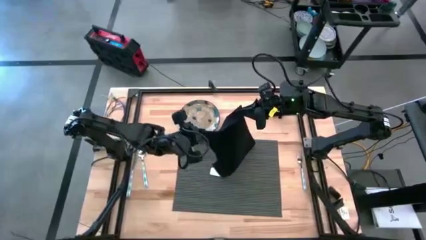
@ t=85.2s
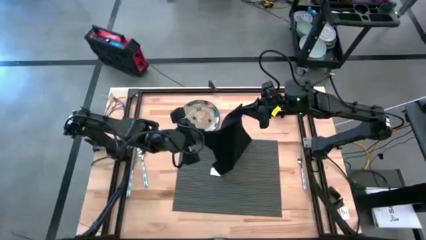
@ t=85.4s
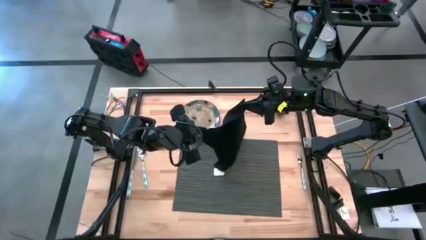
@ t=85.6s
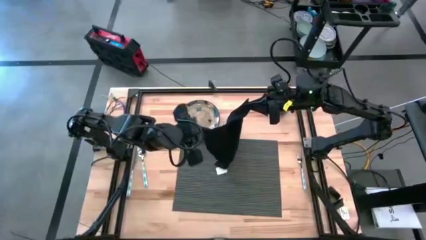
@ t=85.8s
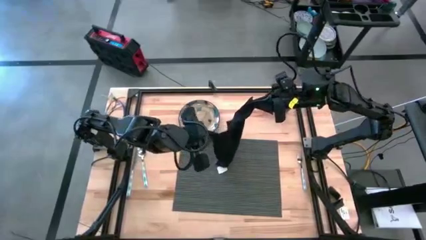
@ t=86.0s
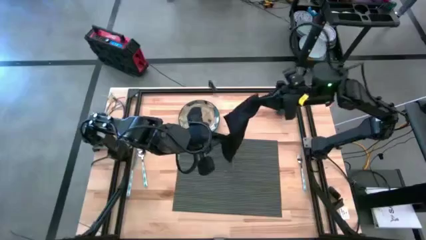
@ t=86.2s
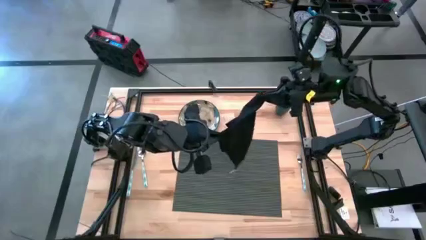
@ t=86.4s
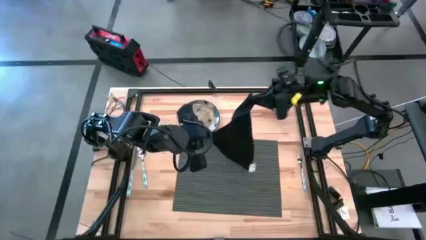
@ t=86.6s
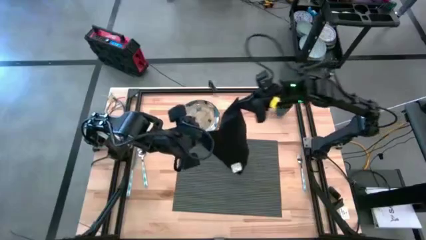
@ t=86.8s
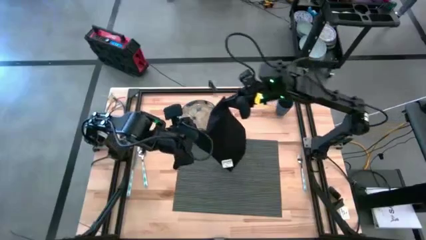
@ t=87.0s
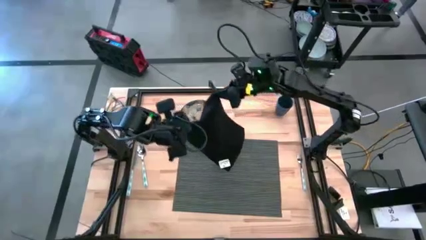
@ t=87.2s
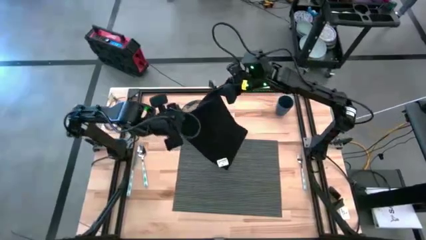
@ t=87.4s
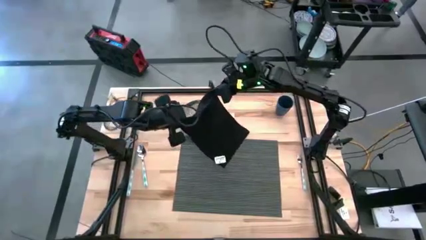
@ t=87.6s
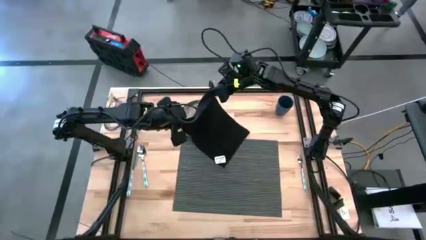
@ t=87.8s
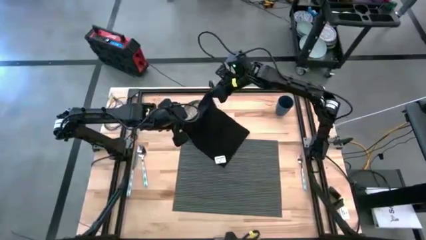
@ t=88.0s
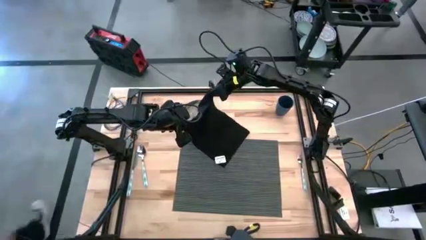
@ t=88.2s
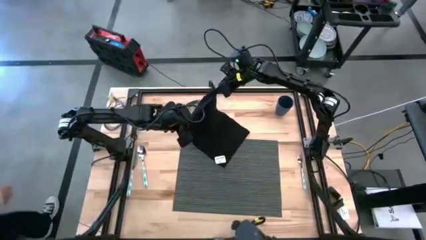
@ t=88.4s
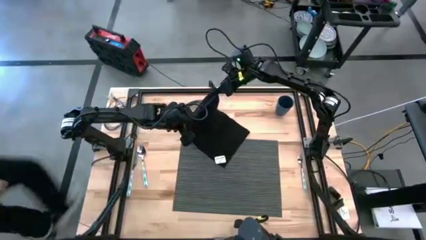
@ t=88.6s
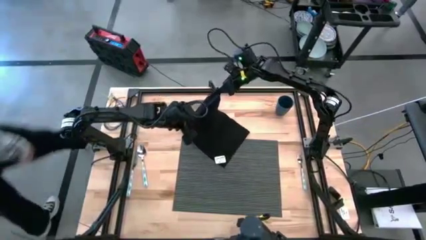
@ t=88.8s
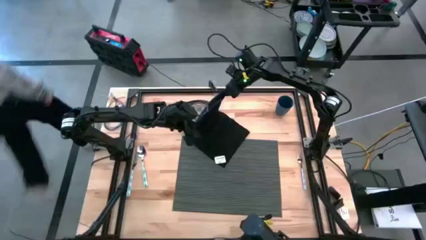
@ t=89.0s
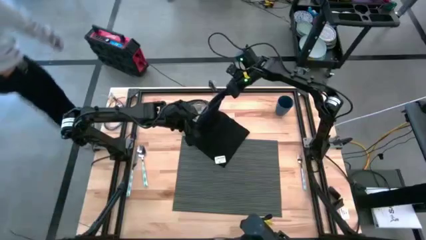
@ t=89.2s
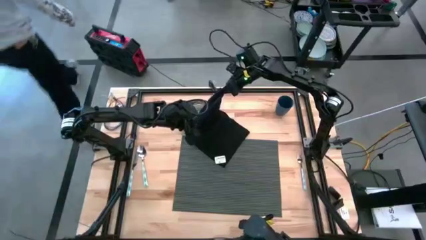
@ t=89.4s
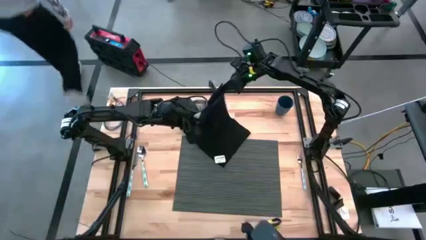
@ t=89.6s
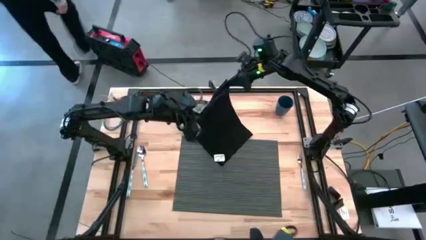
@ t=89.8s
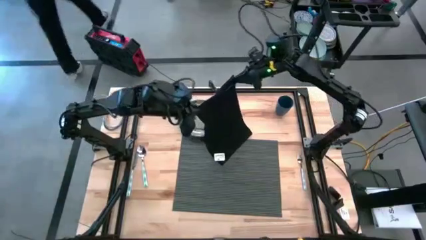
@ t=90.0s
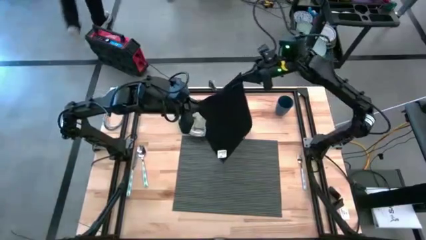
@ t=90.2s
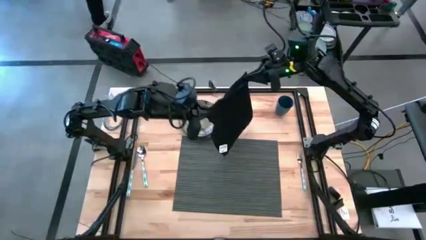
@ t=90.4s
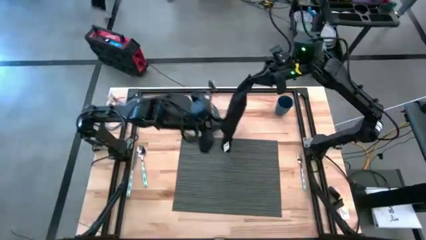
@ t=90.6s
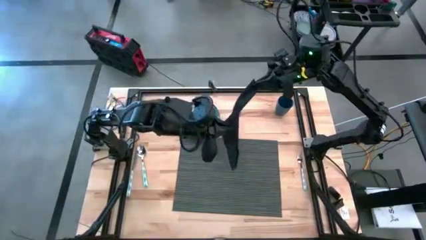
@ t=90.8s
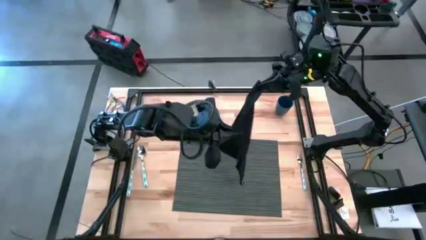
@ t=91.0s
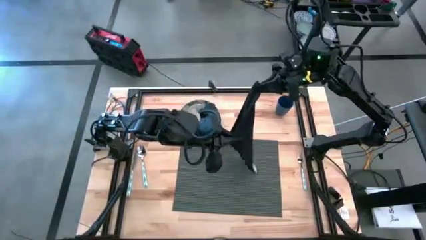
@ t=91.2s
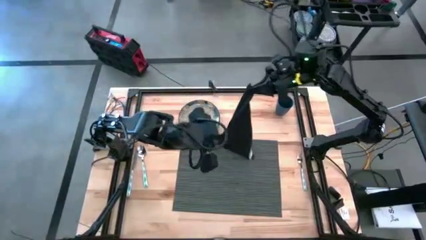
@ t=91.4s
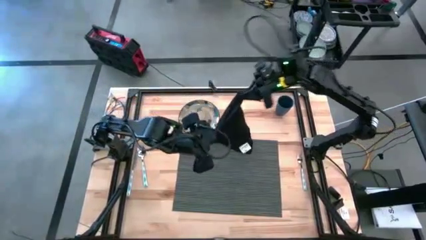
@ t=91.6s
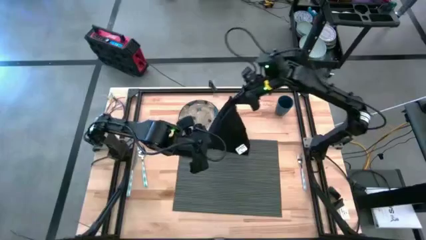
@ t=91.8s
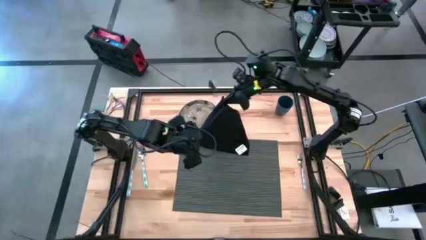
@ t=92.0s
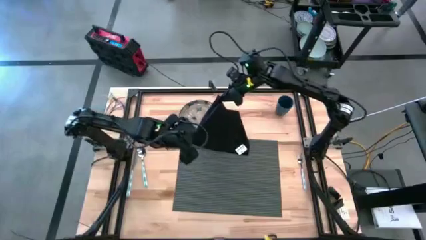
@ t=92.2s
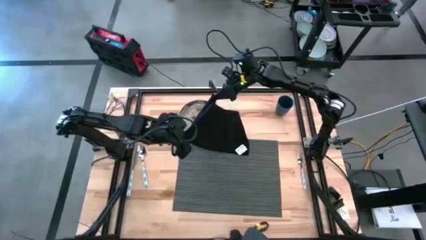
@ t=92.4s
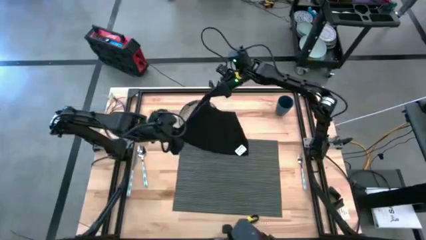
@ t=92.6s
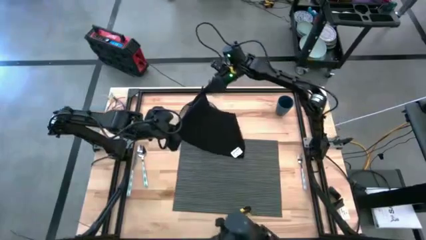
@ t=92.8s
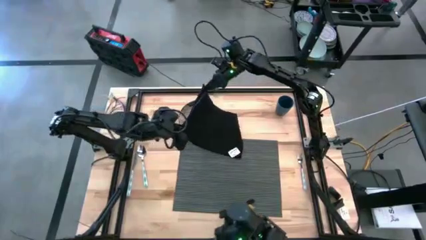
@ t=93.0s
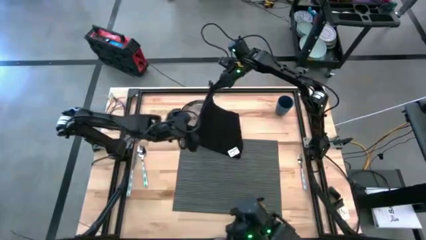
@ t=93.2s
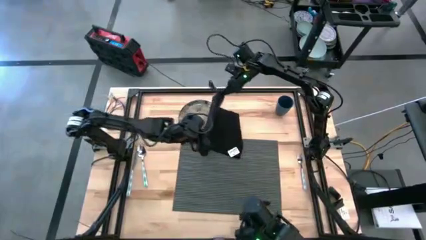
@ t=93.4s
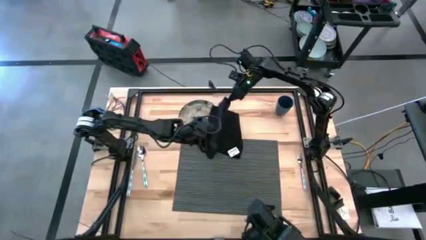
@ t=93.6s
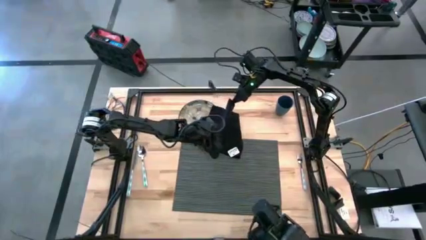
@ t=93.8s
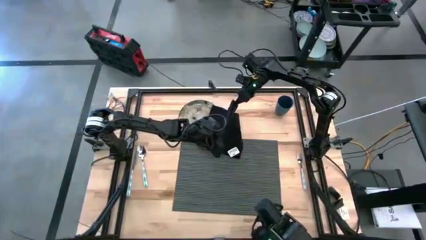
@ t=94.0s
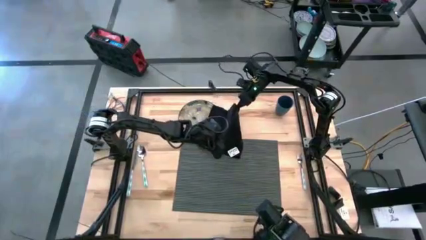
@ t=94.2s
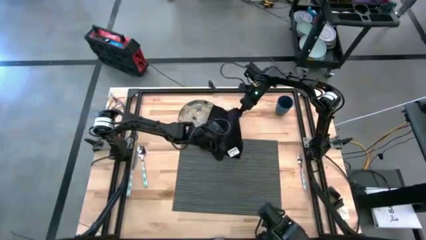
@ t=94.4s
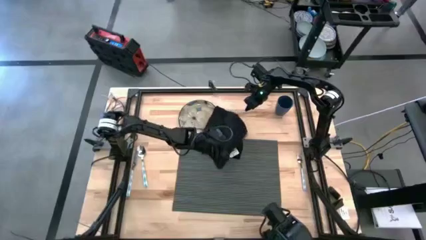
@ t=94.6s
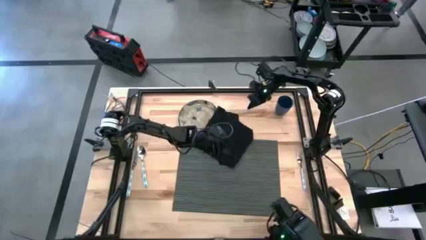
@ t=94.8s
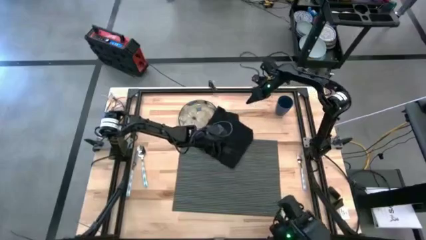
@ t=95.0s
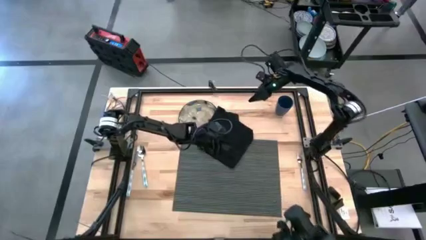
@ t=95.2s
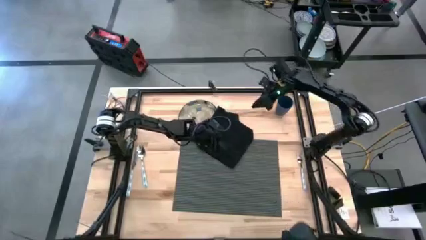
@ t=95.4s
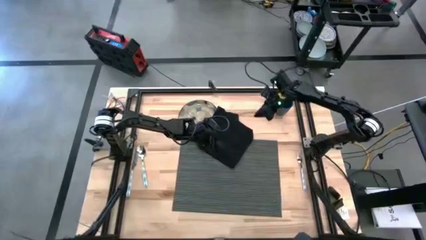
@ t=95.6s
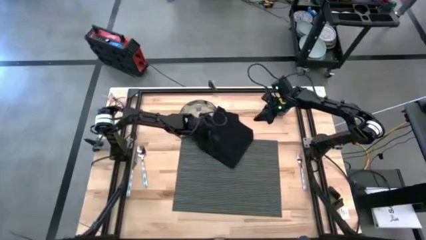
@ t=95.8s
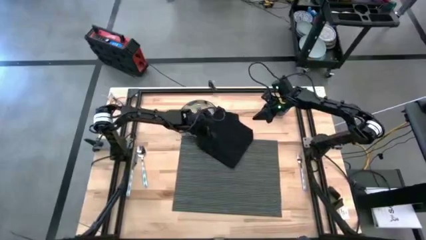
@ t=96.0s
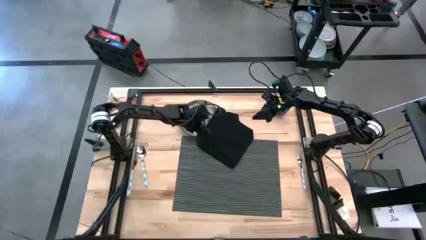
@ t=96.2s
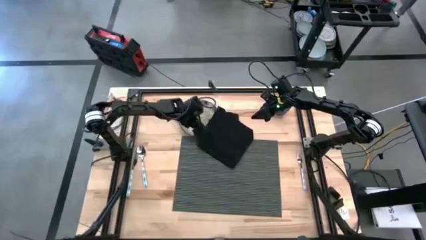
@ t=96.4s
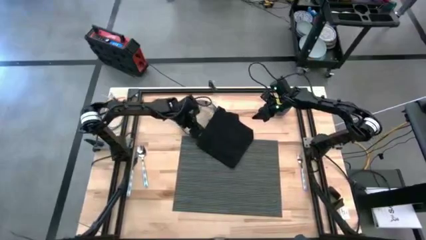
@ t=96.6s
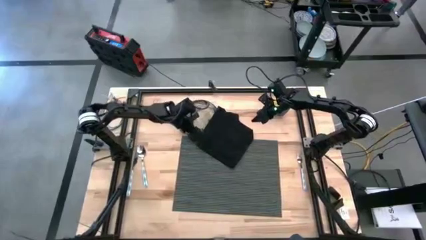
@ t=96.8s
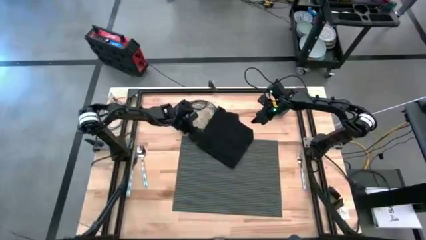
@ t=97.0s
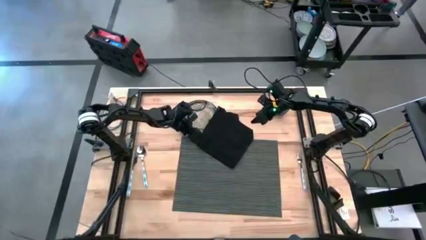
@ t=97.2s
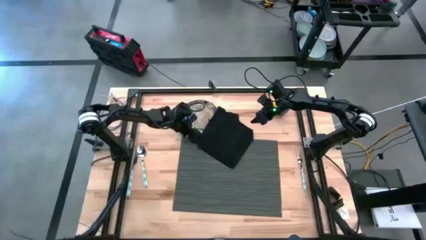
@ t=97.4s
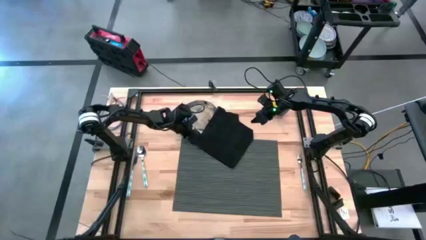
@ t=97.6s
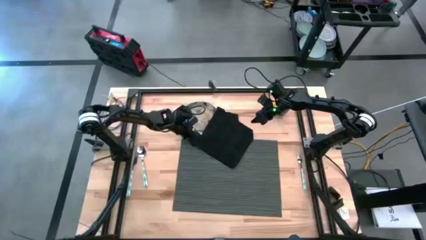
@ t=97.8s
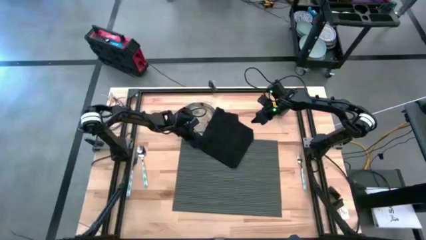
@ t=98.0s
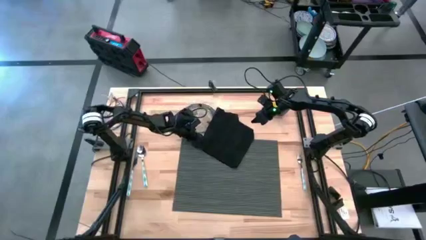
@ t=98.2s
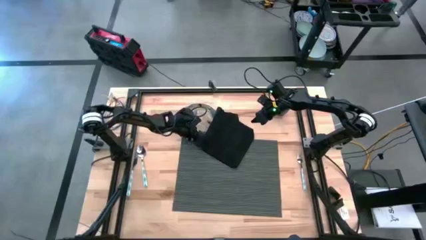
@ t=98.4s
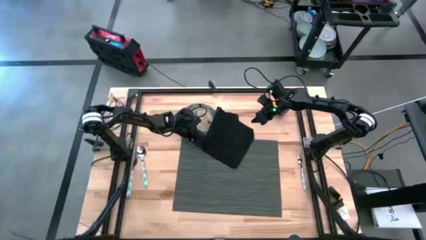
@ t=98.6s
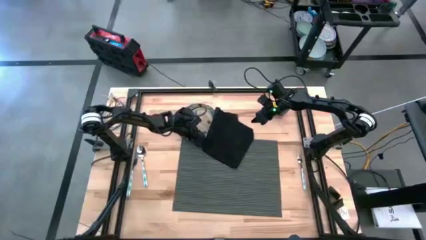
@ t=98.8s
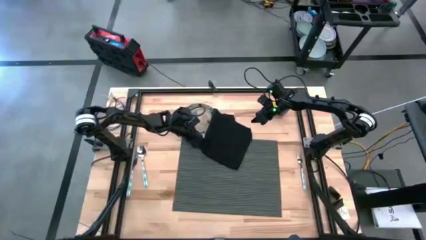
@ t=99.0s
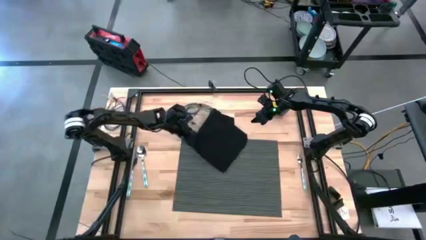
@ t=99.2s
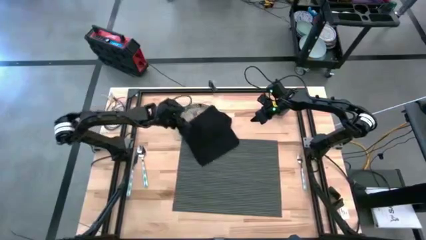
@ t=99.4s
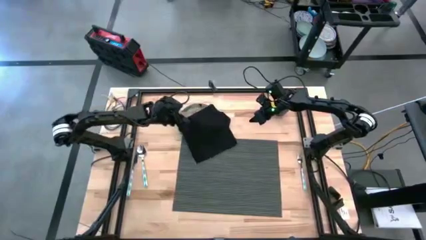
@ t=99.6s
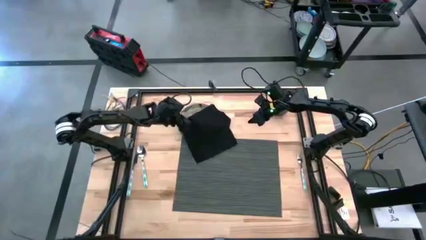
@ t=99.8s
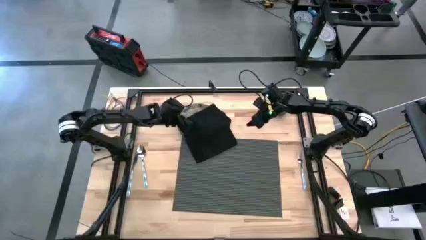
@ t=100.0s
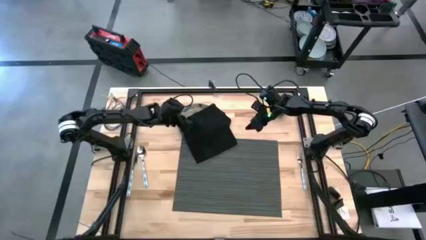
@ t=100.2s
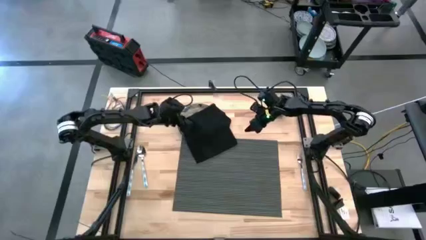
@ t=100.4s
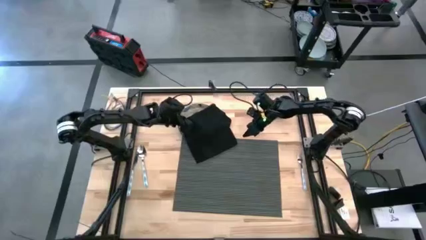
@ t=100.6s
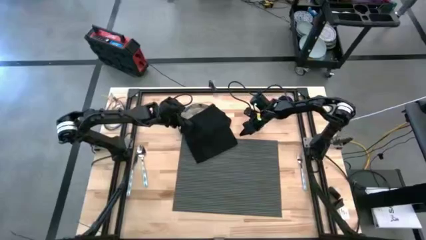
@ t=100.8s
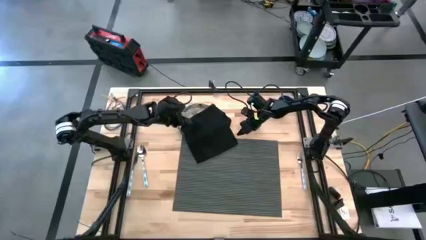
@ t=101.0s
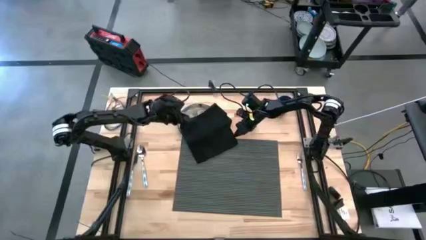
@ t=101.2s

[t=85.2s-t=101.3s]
Task: Set table place
Fold the black napkin
